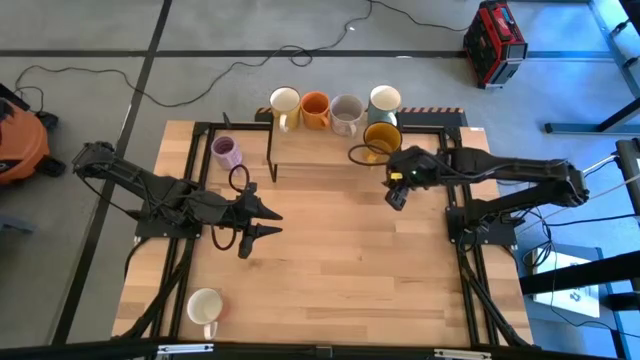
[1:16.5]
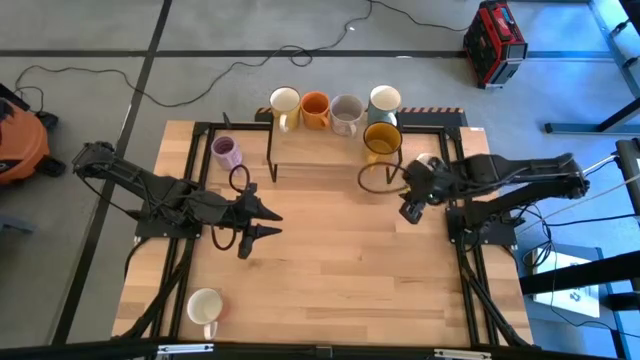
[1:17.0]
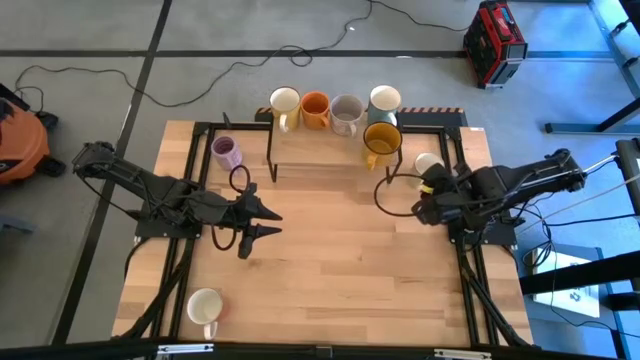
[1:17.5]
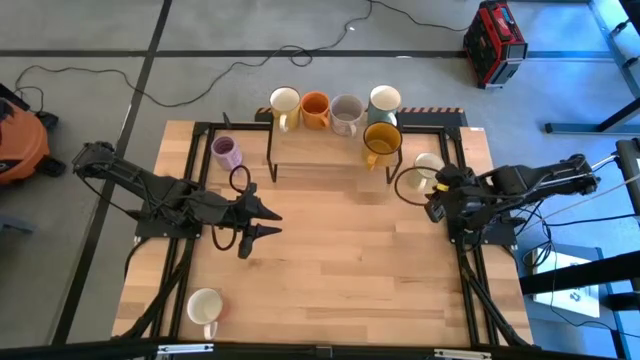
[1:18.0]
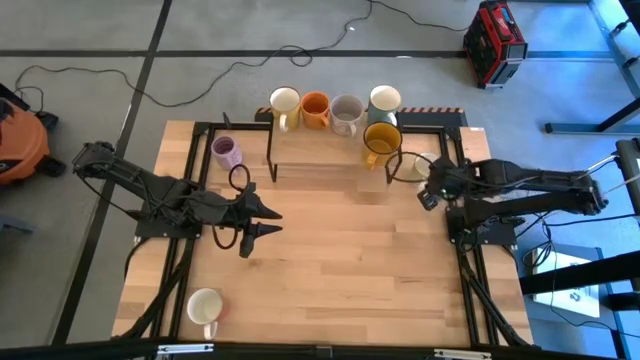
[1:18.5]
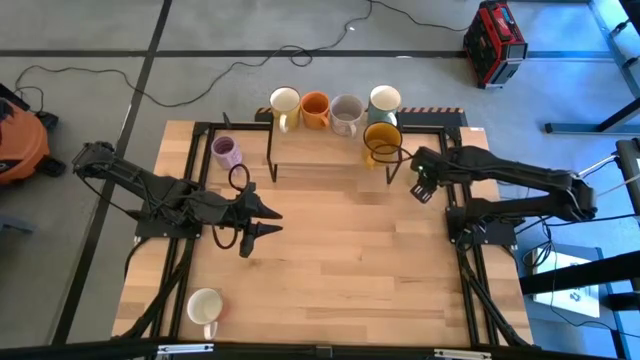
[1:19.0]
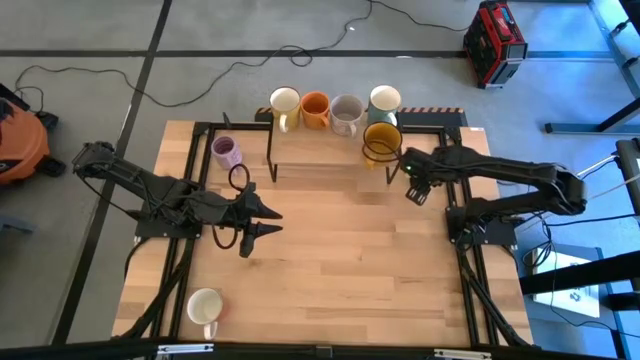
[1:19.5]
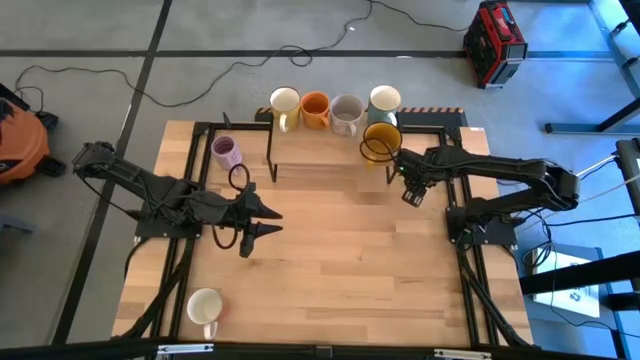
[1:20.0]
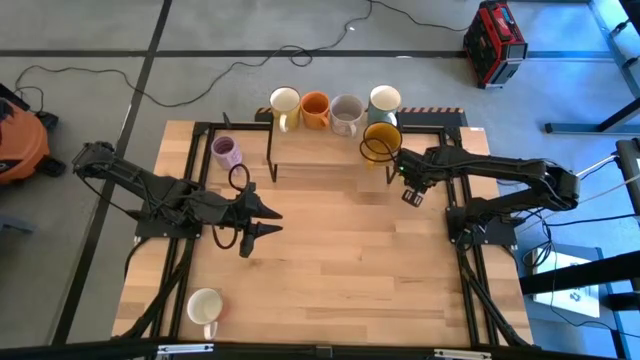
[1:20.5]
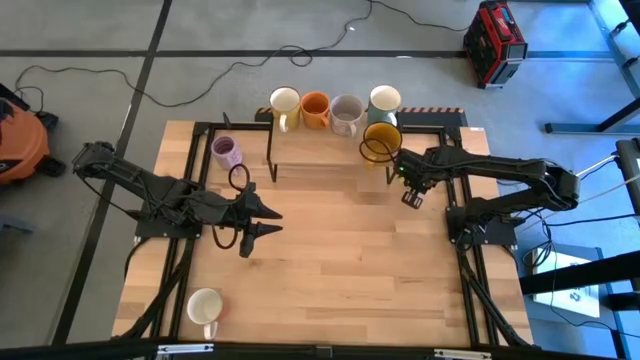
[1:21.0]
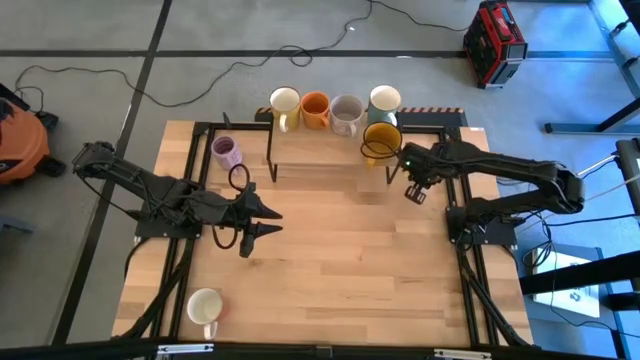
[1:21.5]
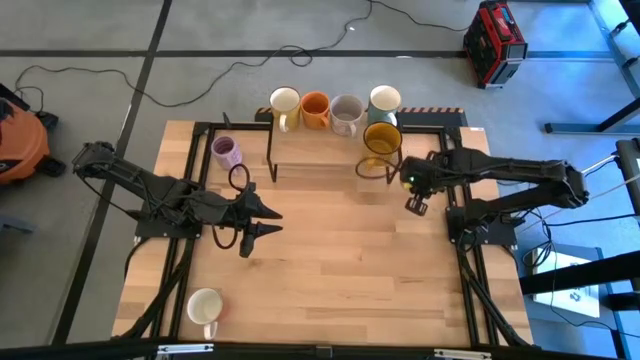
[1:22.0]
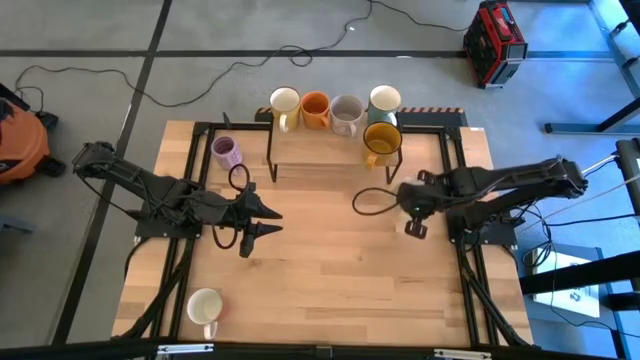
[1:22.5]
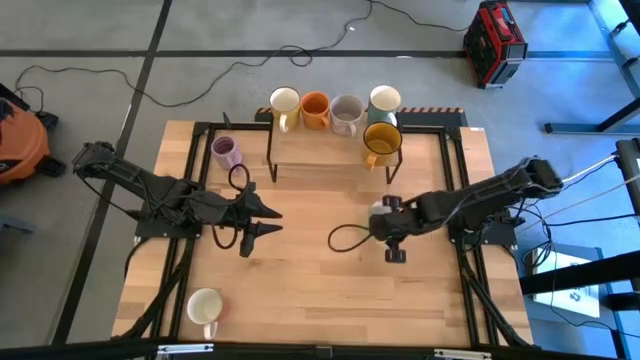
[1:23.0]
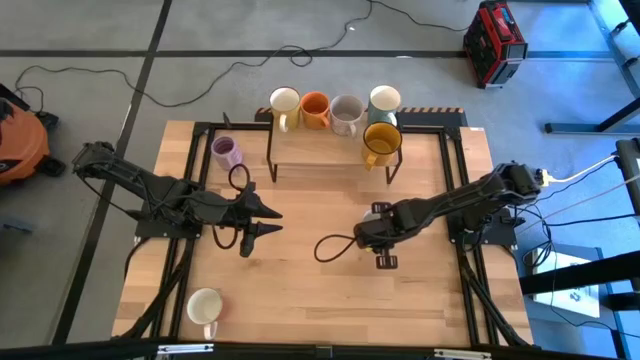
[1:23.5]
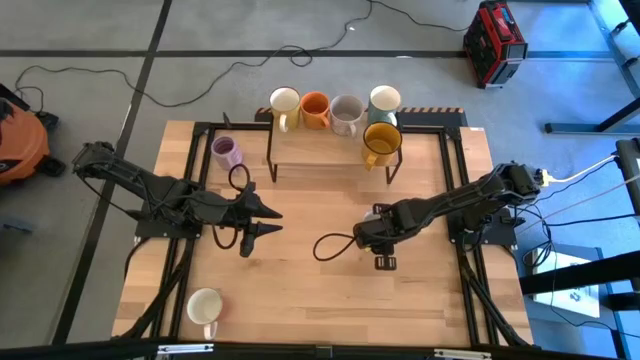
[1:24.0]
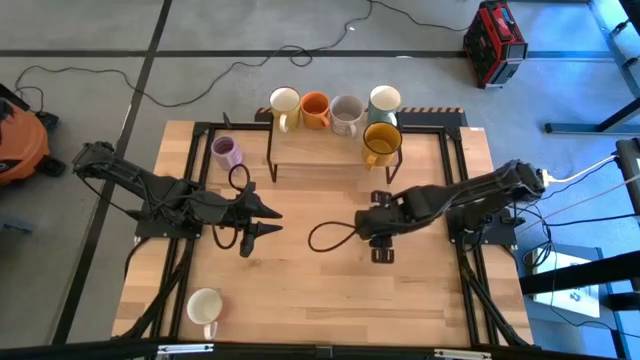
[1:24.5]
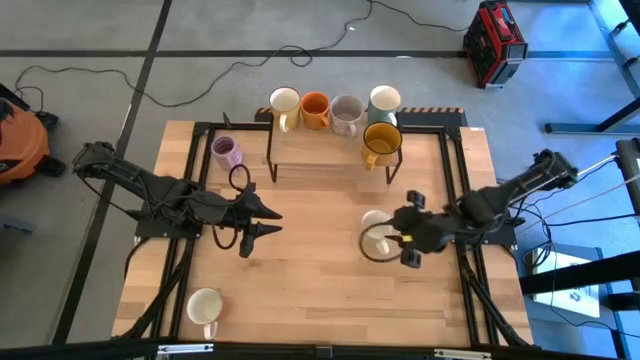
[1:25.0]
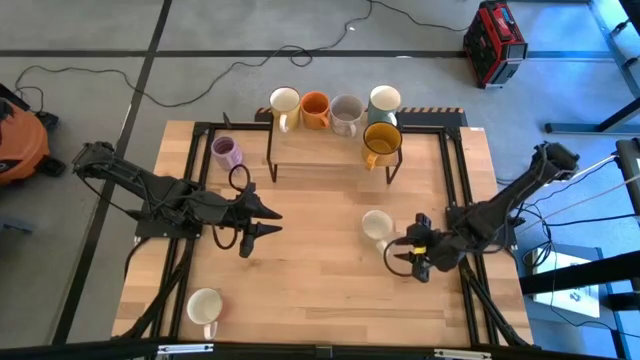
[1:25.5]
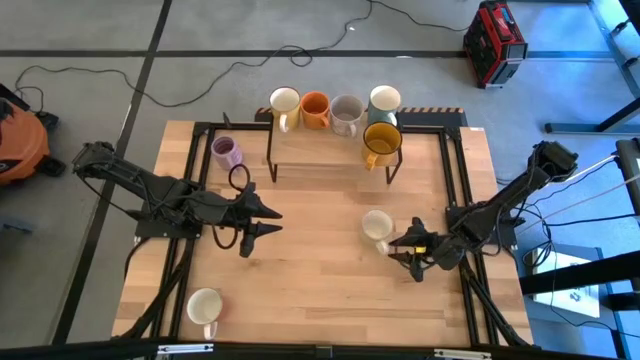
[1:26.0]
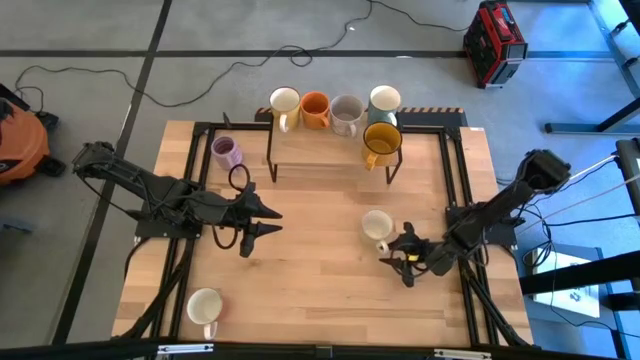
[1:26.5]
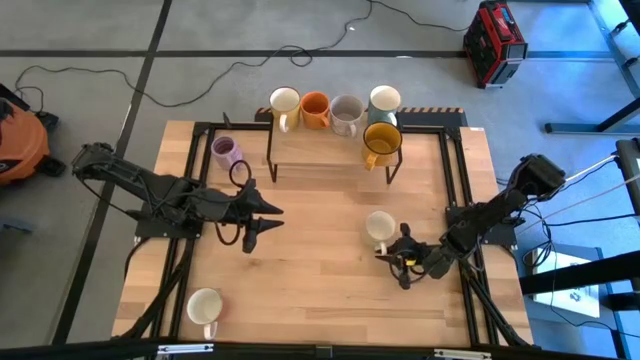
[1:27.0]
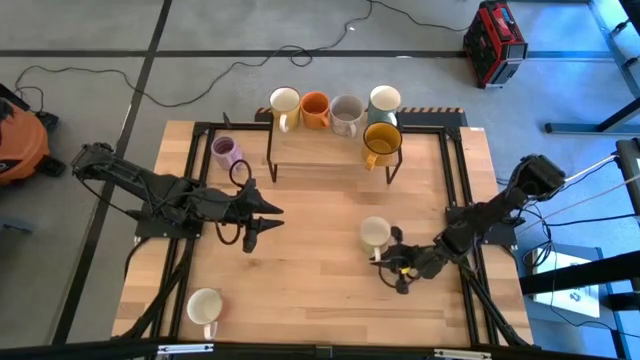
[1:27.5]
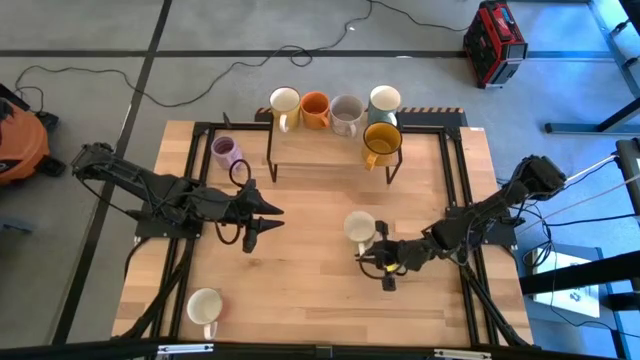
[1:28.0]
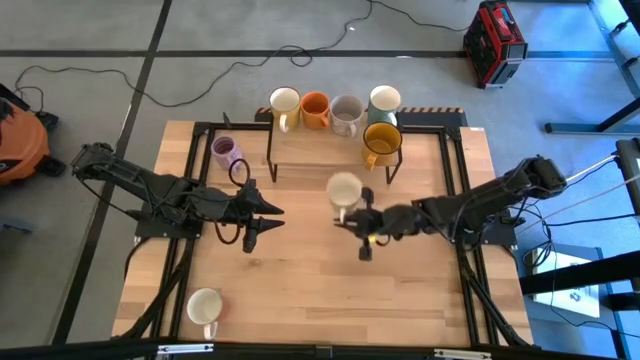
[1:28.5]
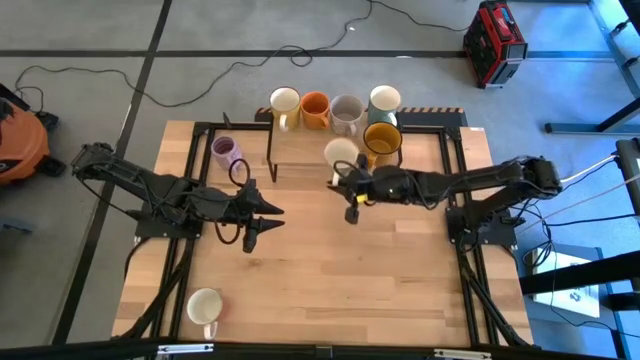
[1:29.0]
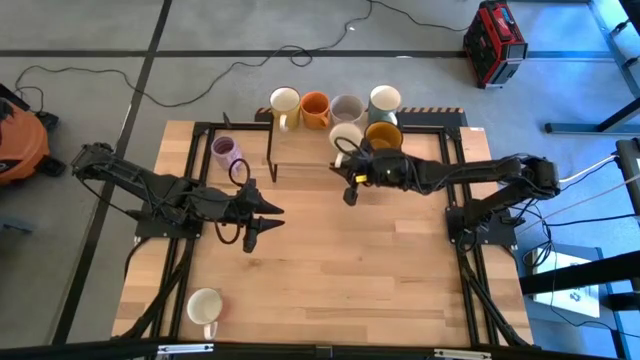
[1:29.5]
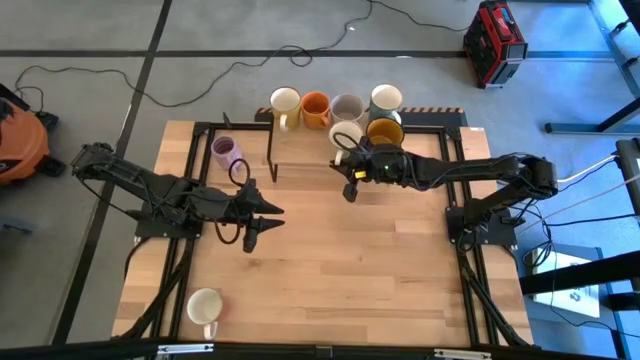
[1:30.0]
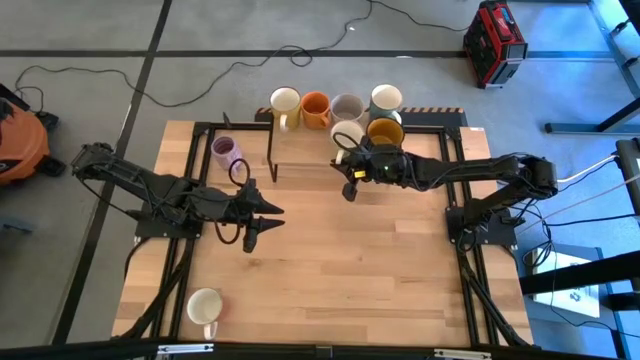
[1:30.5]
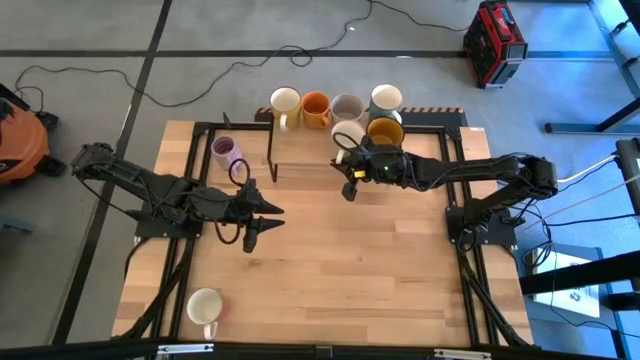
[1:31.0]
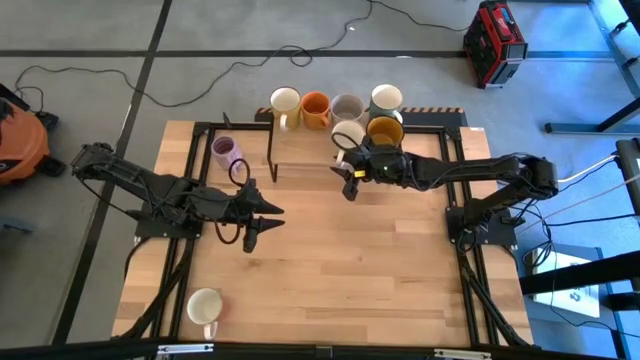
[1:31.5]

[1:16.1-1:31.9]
Task: Place coffee mugs
Put the light green mug on the shelf

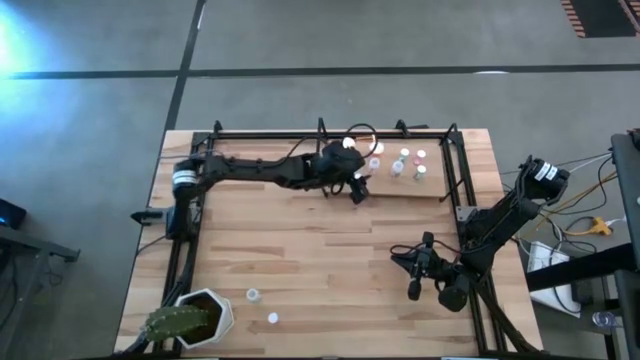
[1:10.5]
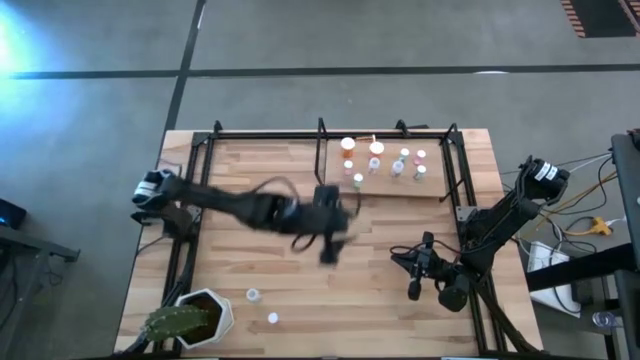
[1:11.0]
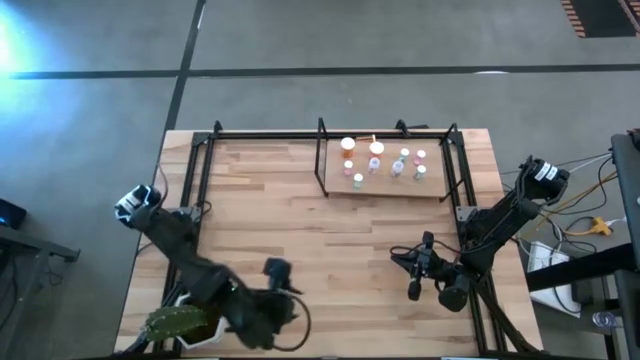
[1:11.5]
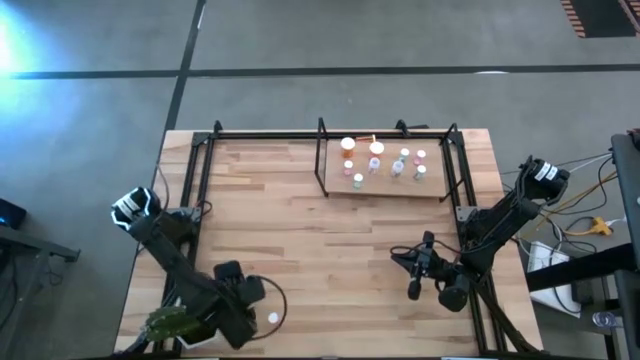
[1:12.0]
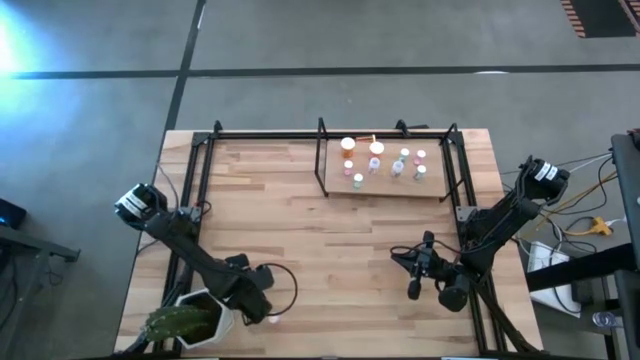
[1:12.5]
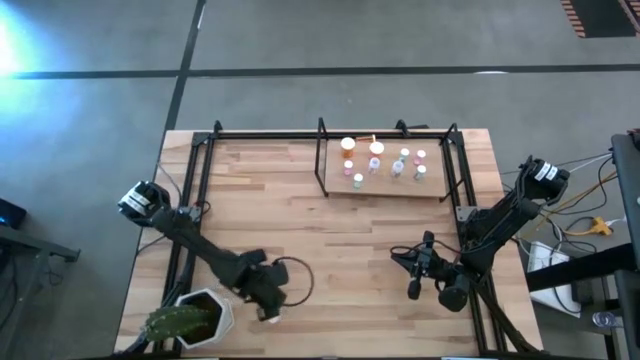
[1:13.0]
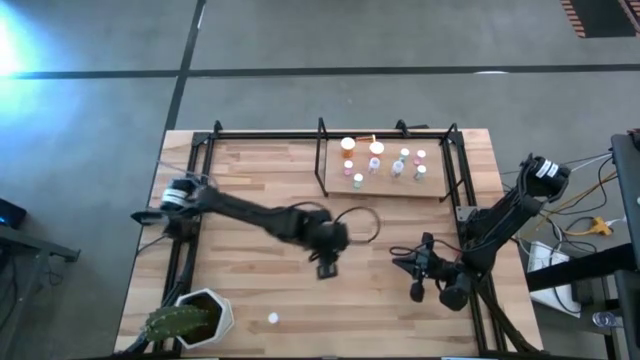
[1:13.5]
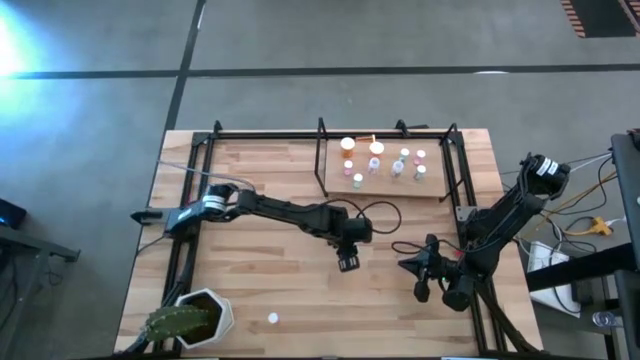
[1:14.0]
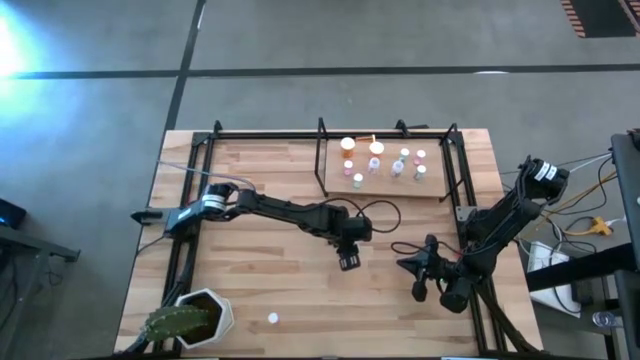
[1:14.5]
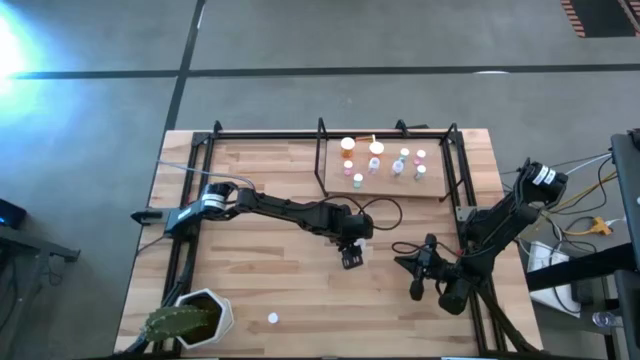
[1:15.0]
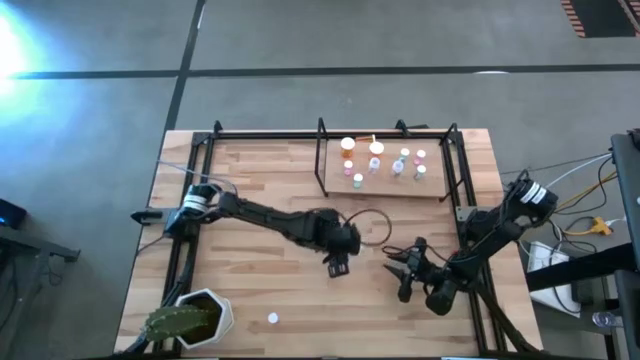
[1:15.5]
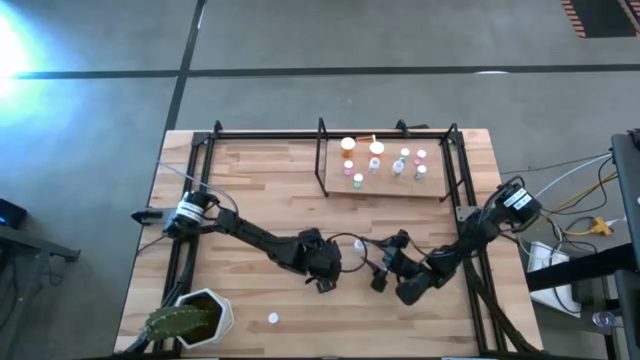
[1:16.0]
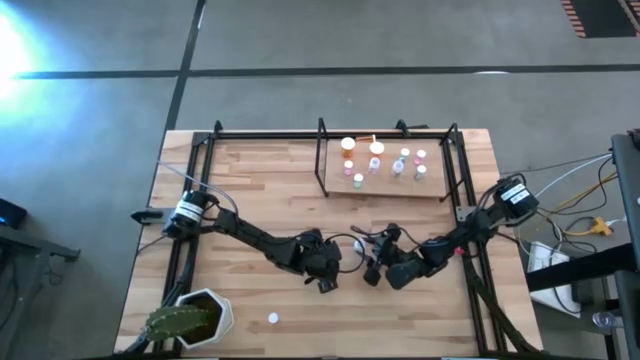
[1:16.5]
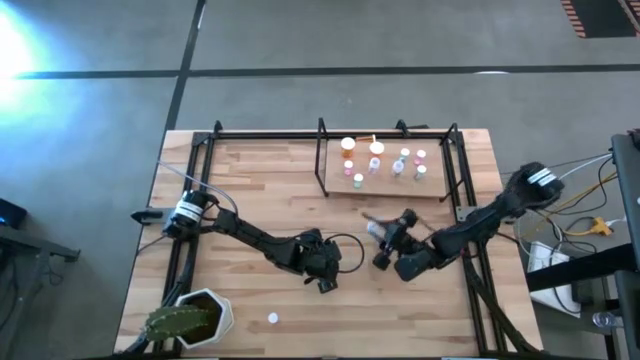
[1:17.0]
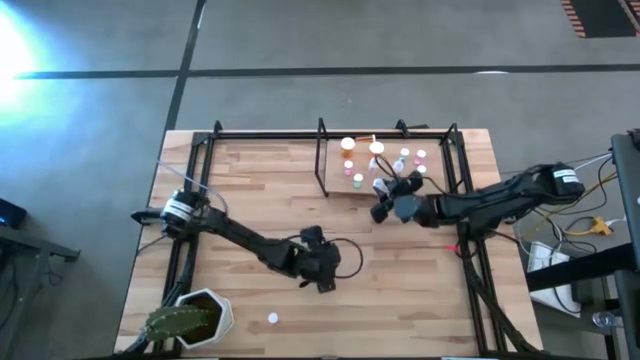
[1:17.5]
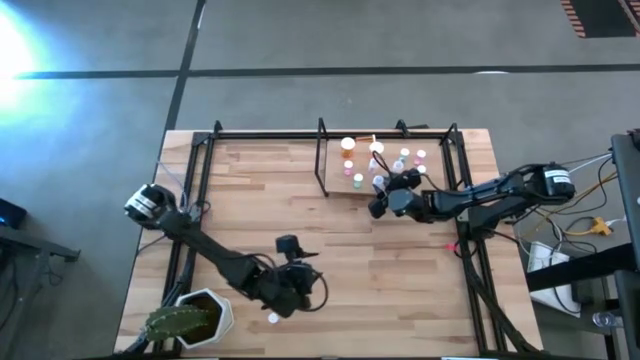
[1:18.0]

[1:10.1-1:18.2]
Task: Pick and place medicine bottles onto shelf by color
Put the transparent pill bottle on the shelf
